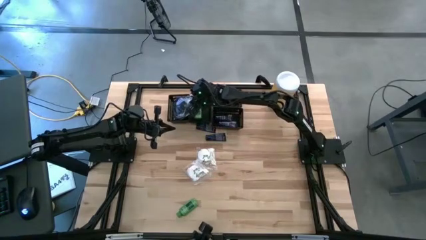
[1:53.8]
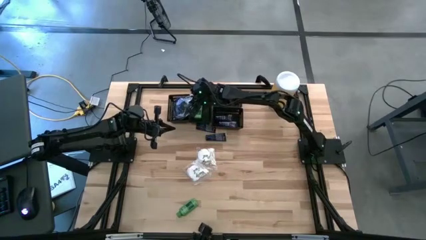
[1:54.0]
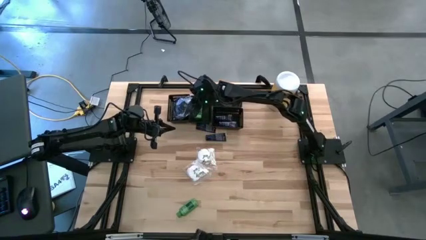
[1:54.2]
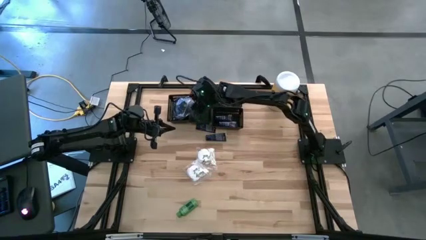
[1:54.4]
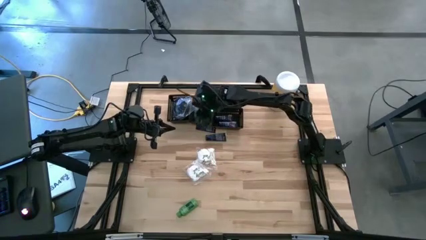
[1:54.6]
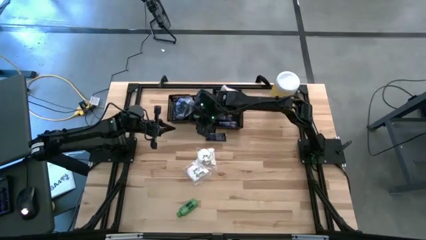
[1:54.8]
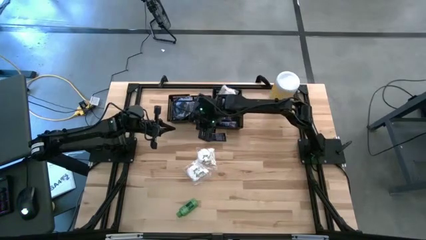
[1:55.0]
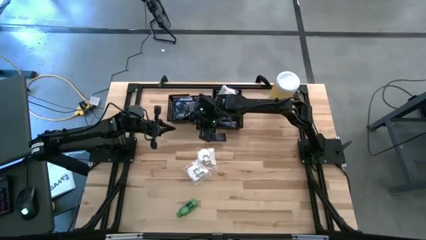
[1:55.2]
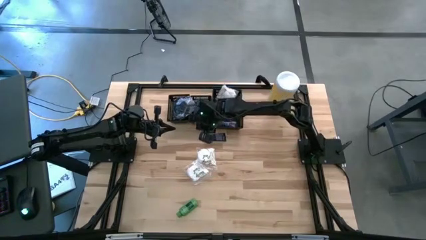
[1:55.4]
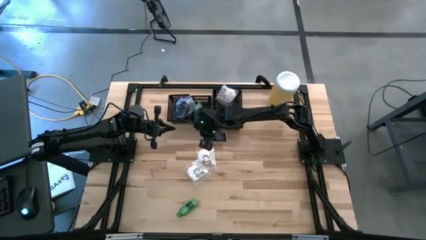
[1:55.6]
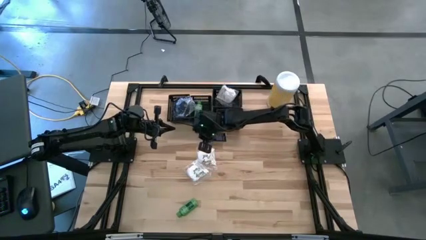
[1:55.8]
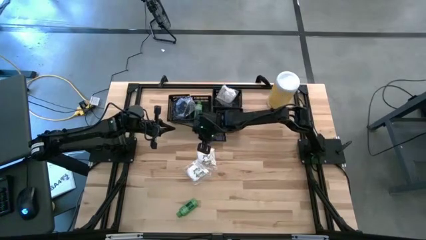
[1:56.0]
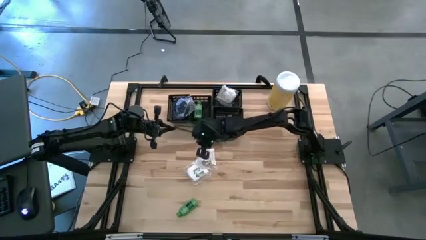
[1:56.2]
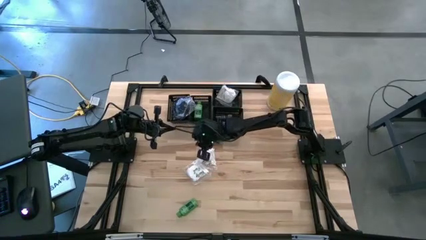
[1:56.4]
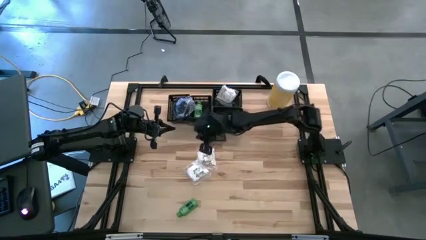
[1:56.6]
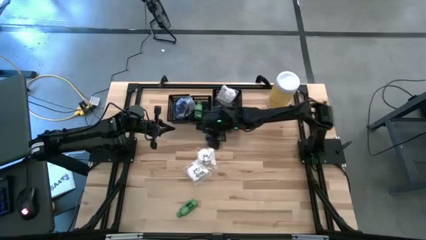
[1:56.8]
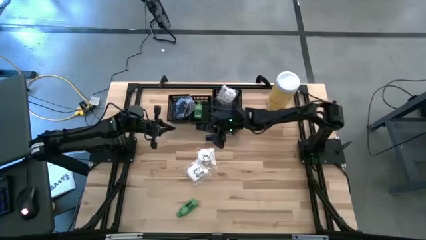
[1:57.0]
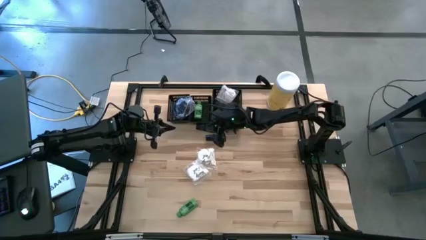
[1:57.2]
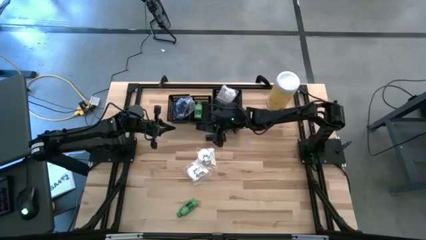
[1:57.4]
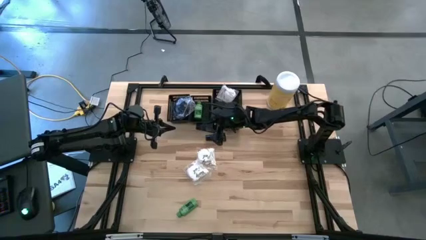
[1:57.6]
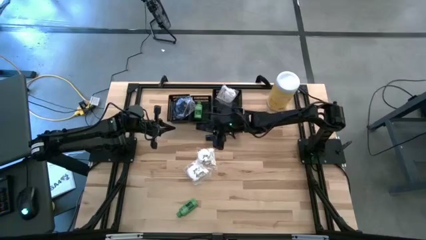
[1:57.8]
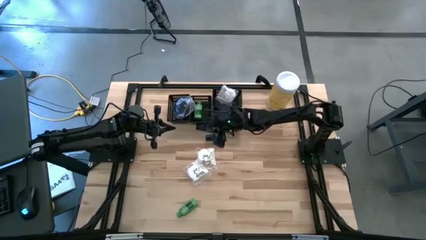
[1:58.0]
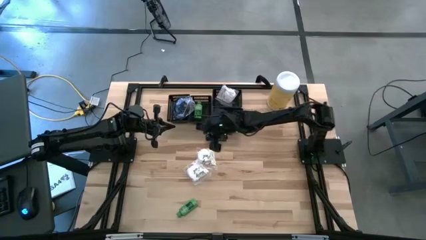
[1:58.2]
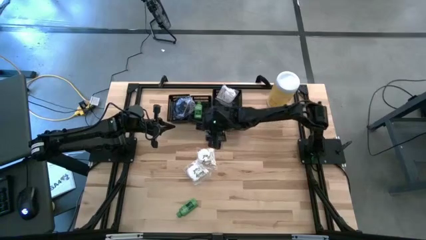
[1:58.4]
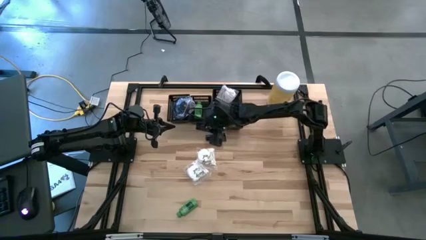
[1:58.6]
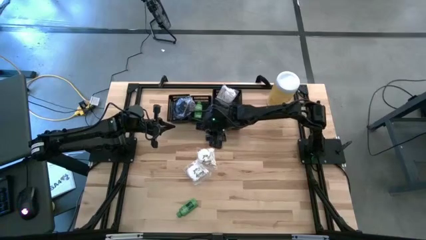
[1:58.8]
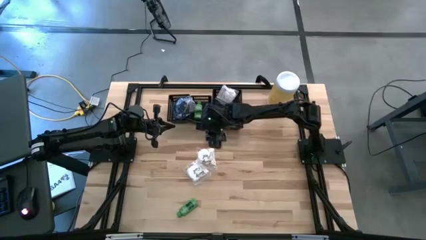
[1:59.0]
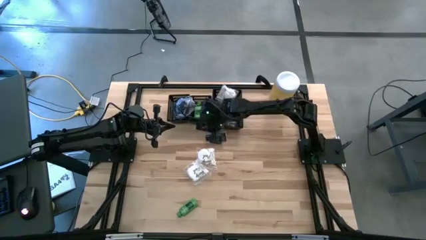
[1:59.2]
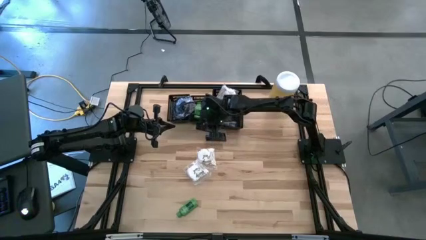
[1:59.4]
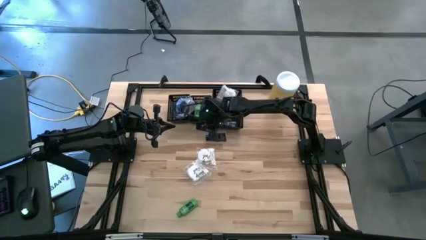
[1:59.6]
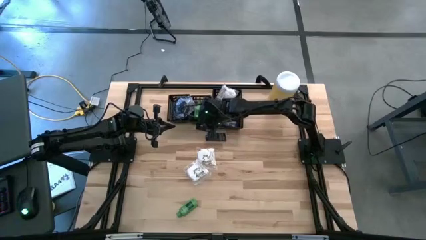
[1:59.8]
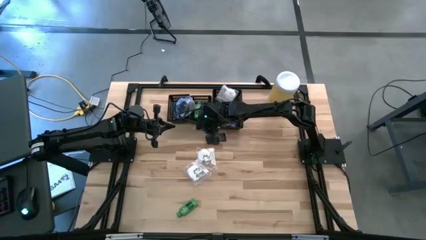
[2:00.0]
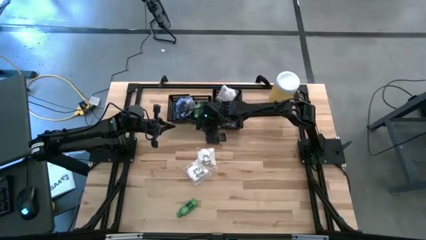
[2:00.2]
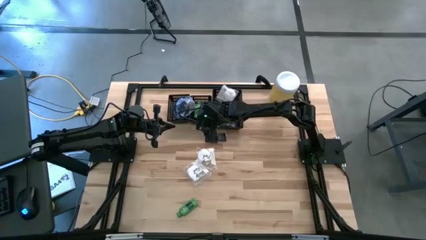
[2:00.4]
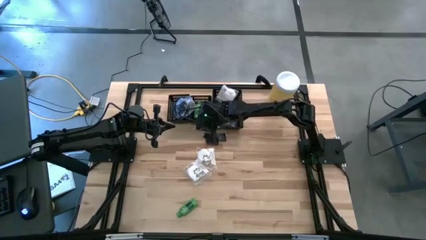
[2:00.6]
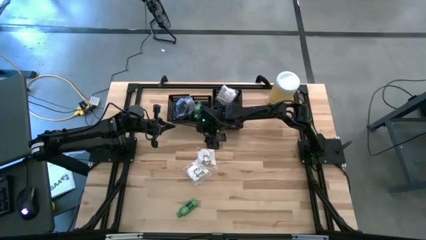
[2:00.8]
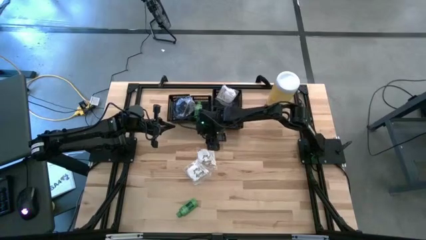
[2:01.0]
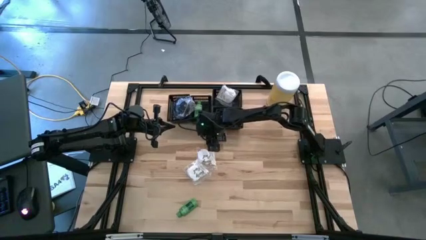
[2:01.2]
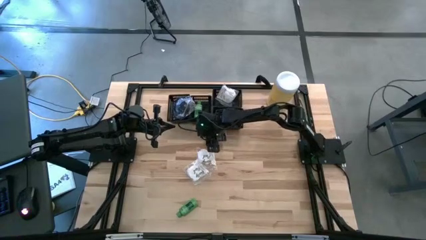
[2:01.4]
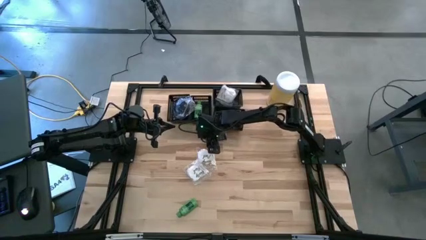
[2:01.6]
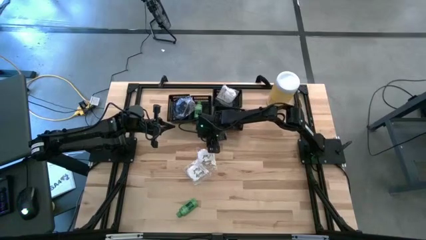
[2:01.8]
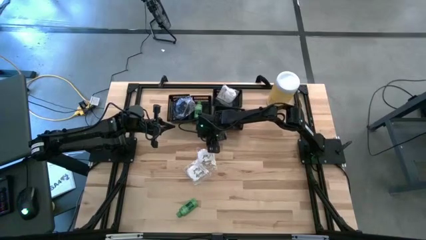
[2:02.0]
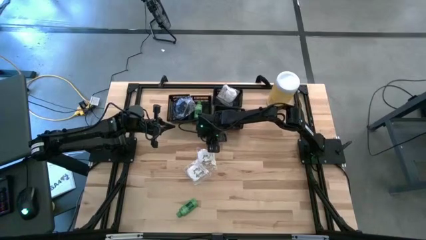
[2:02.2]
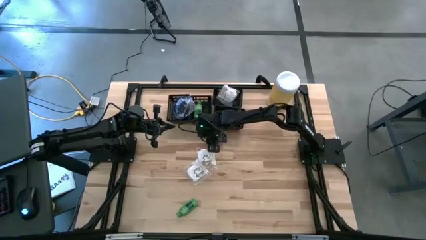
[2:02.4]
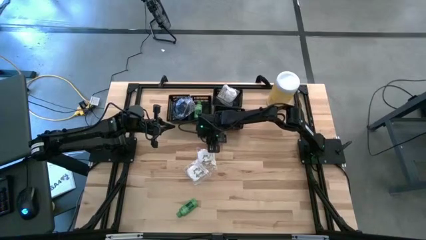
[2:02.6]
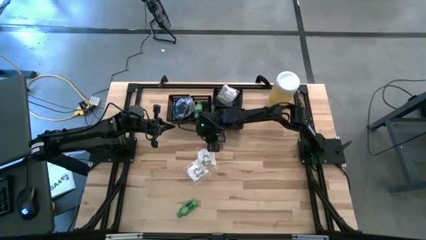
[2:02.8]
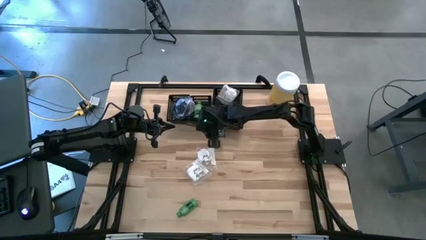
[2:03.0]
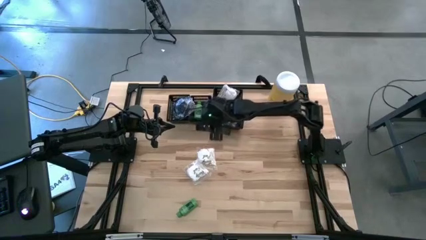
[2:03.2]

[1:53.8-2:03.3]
Task: Pick & Place Travel size toiletries
Put the blue shave cream into the bottom black bin

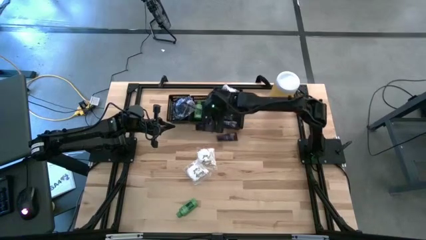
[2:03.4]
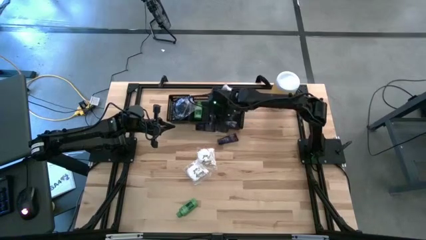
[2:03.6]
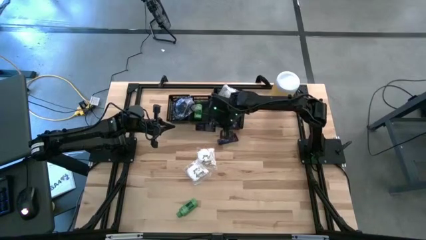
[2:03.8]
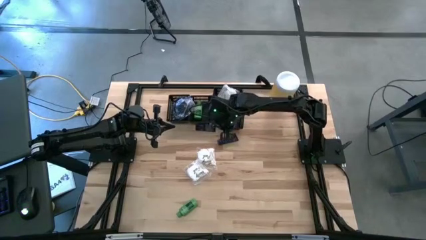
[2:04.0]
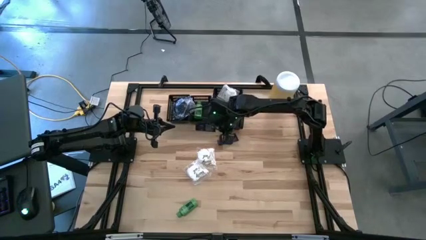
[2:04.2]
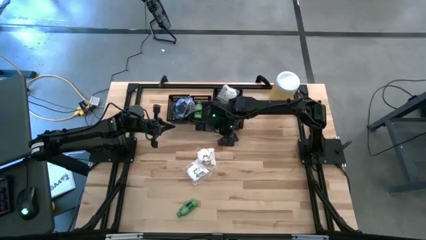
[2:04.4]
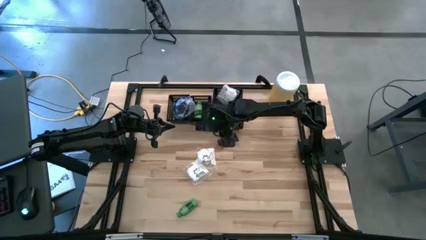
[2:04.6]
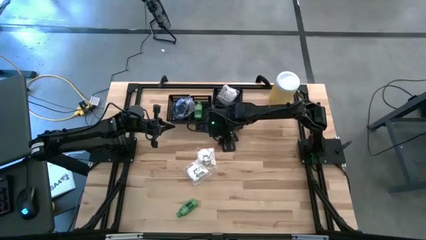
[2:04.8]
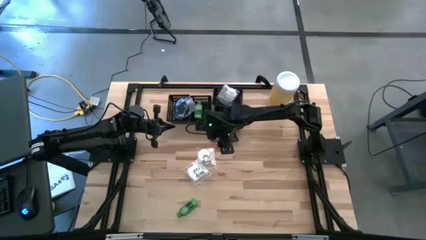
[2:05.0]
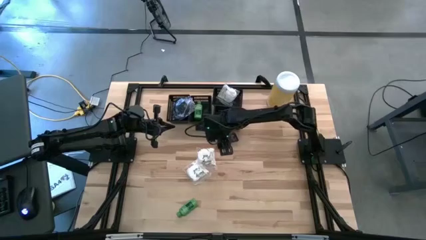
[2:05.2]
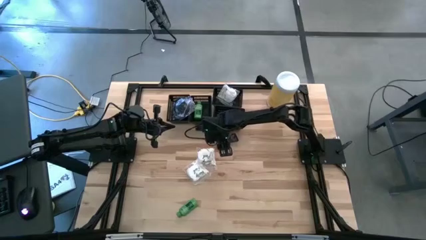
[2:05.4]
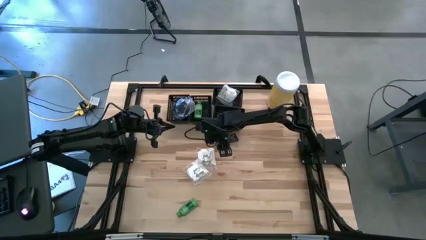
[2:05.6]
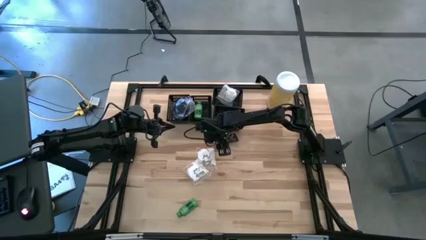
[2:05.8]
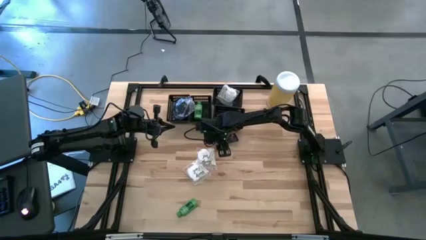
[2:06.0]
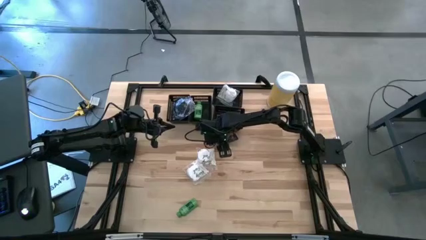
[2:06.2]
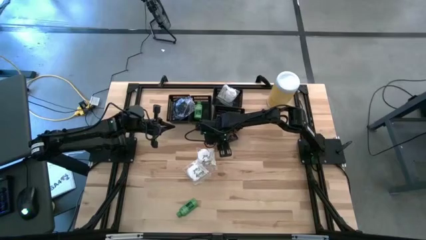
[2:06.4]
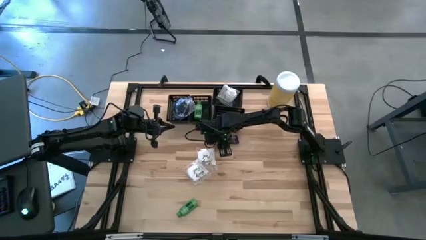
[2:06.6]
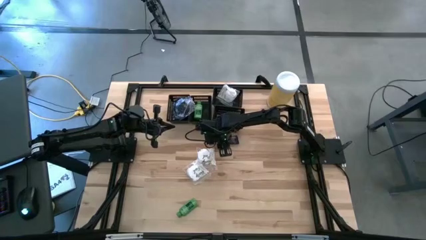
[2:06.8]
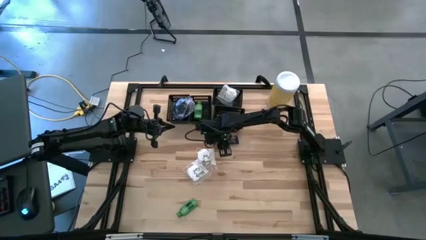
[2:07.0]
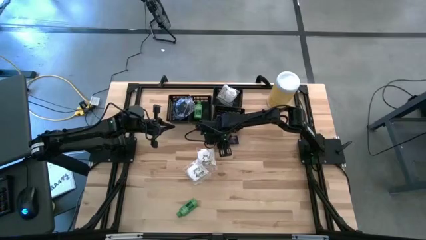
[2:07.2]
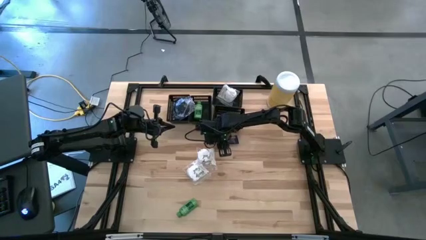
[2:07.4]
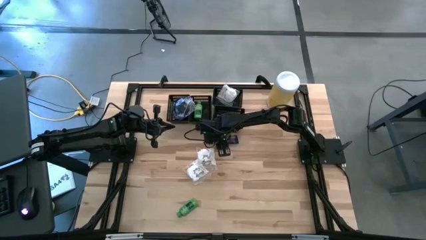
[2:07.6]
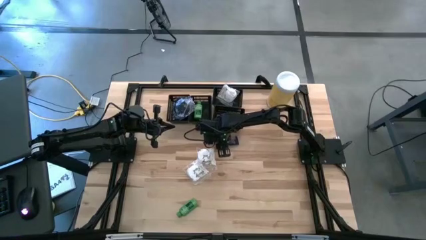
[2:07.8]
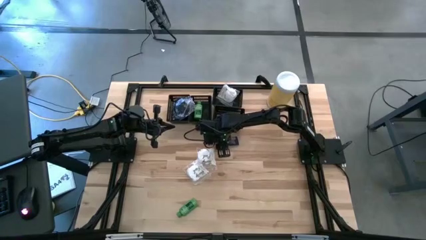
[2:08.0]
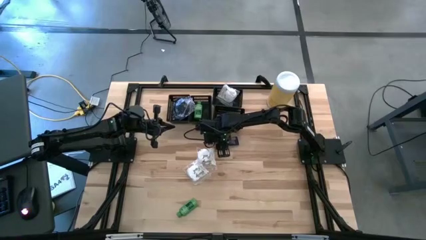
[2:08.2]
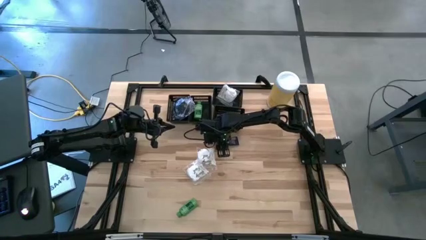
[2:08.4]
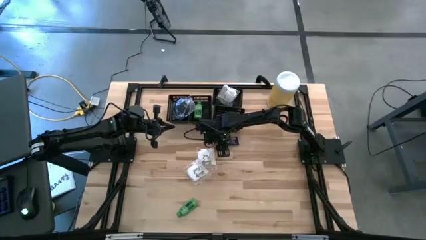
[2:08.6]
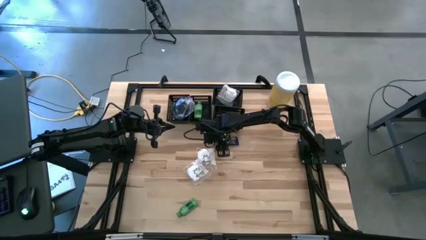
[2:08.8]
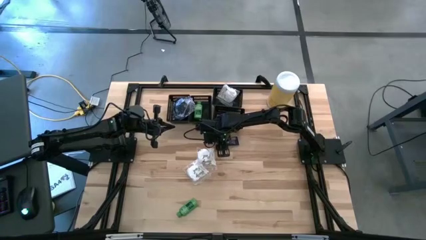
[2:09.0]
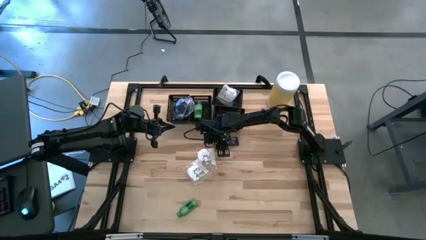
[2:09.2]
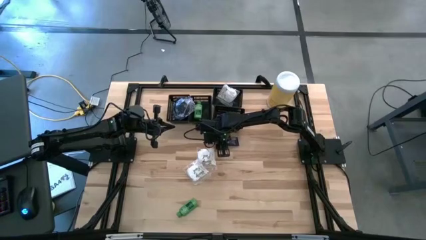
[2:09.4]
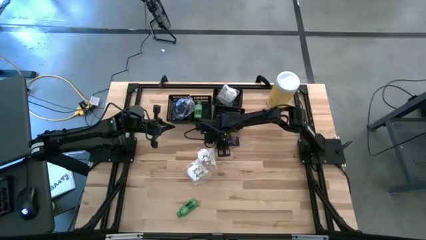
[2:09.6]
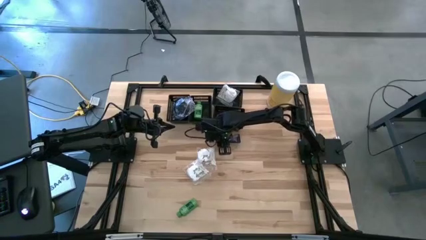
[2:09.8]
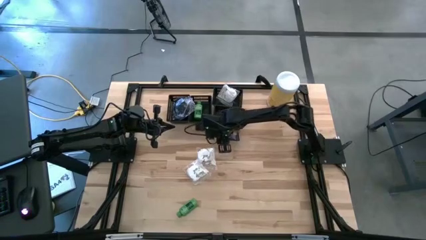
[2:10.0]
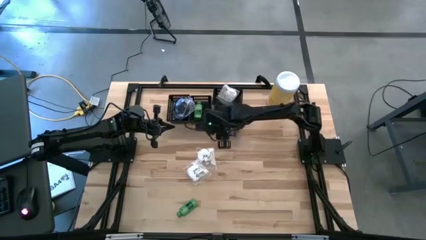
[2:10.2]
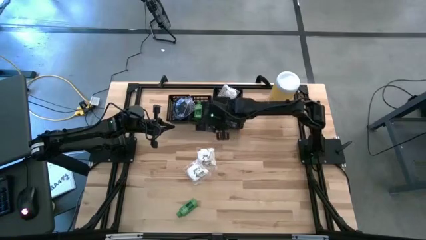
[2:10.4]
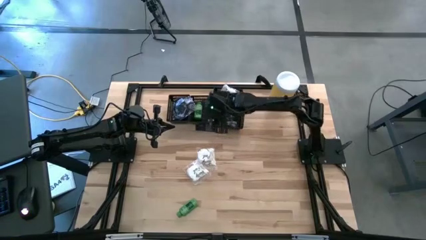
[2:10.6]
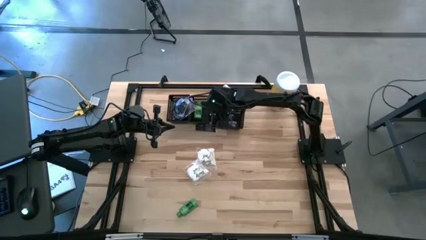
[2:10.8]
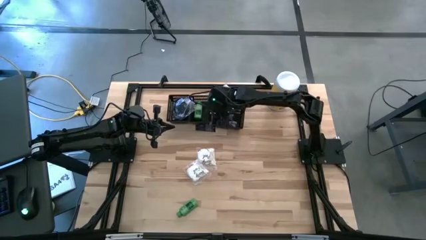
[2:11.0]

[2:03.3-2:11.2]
Put the blue shave cream into the bottom black bin
